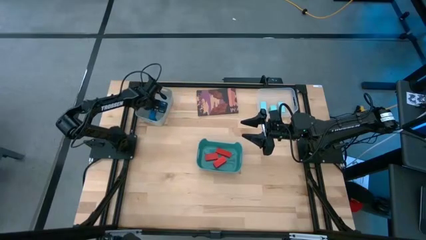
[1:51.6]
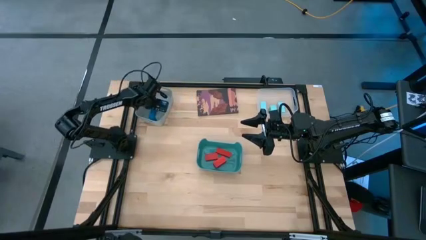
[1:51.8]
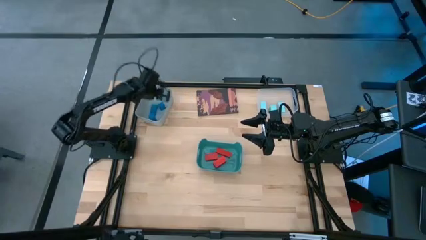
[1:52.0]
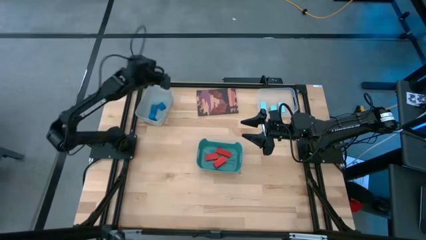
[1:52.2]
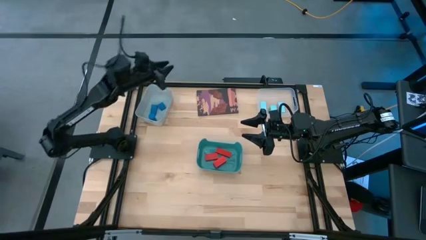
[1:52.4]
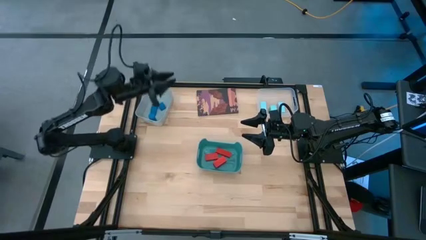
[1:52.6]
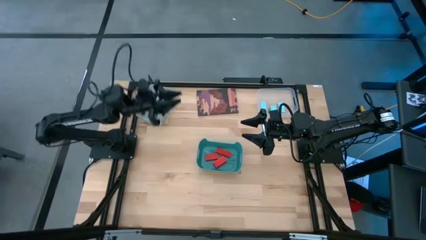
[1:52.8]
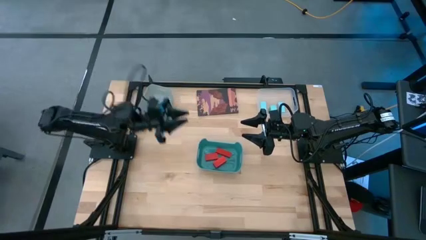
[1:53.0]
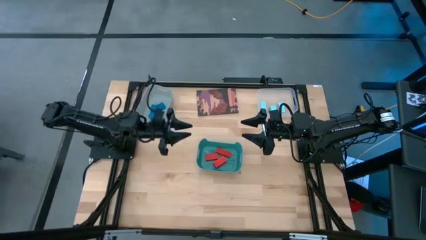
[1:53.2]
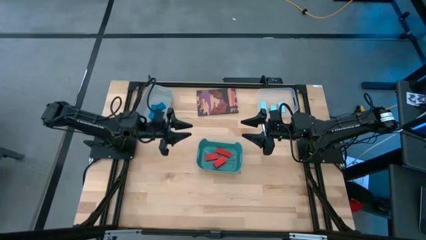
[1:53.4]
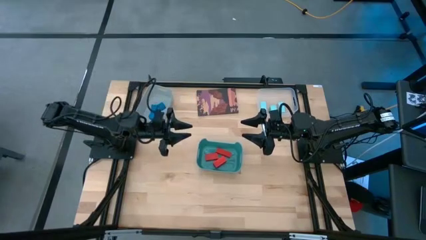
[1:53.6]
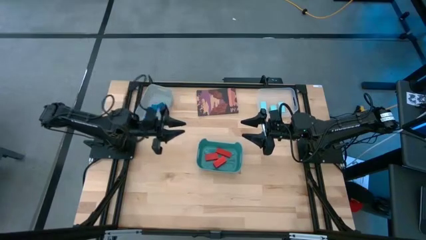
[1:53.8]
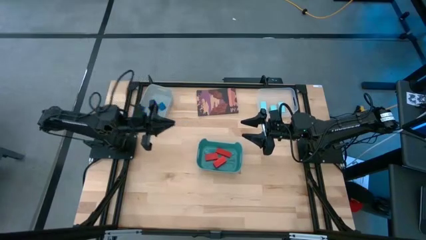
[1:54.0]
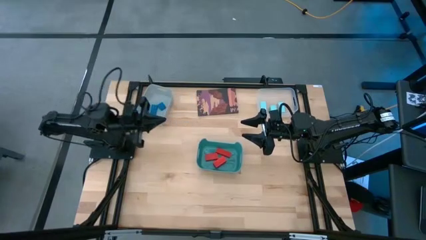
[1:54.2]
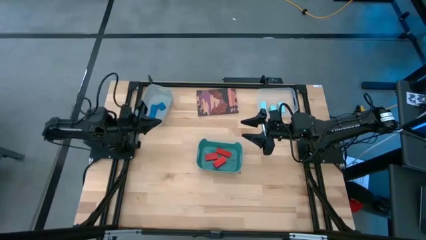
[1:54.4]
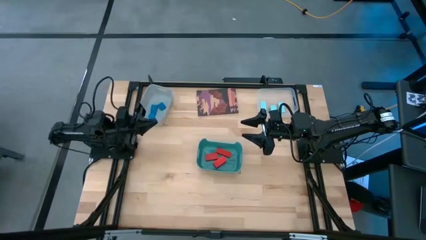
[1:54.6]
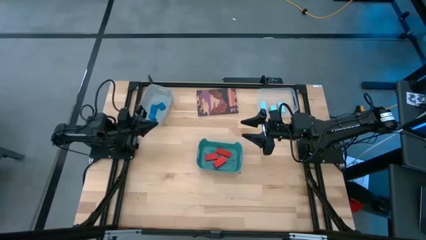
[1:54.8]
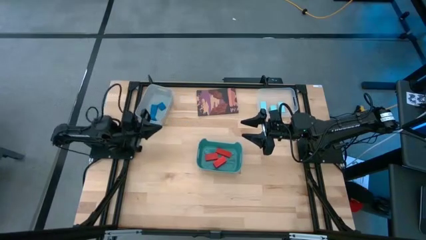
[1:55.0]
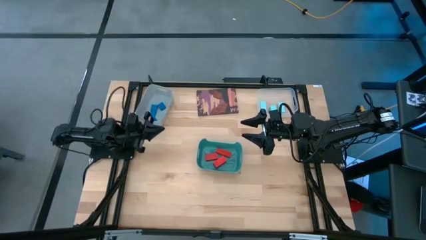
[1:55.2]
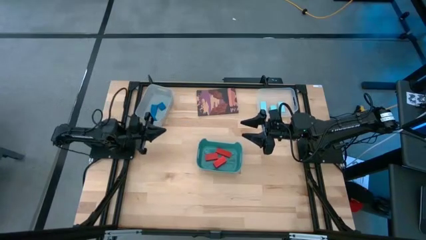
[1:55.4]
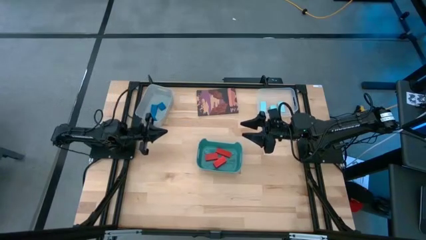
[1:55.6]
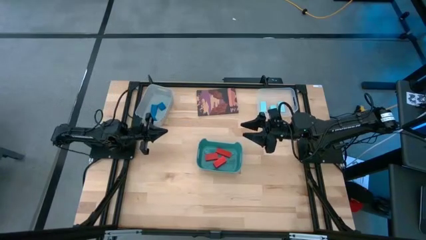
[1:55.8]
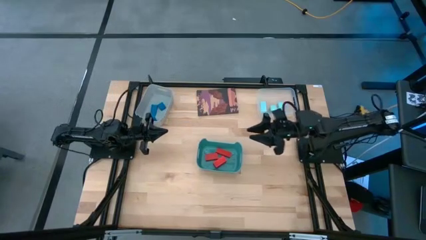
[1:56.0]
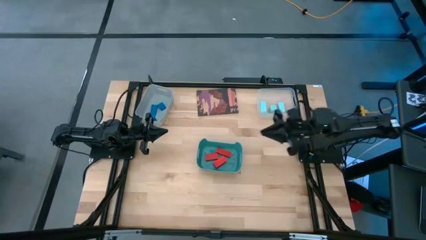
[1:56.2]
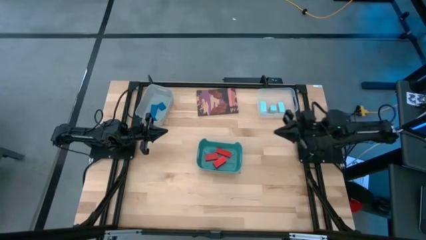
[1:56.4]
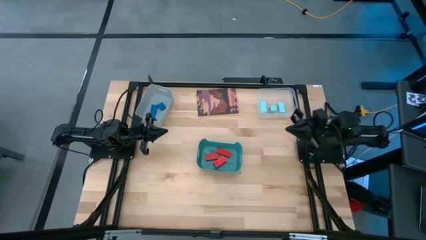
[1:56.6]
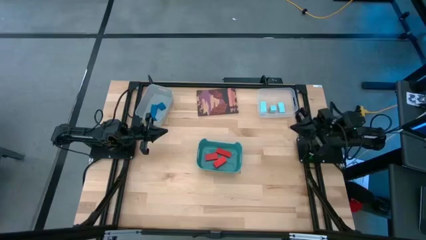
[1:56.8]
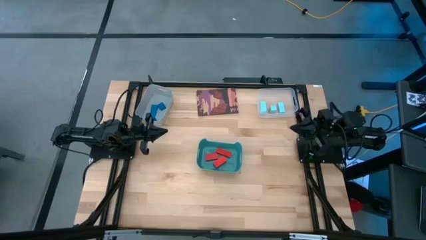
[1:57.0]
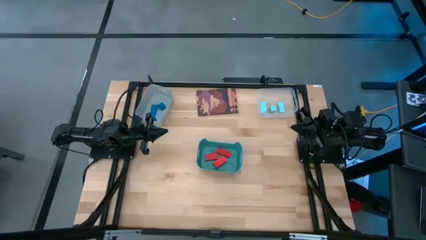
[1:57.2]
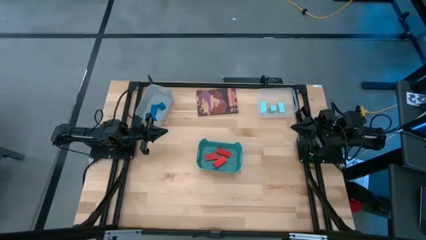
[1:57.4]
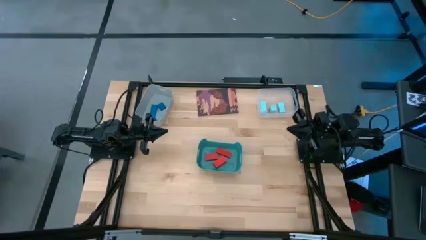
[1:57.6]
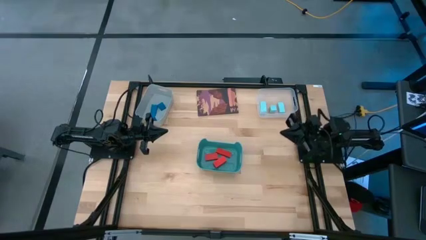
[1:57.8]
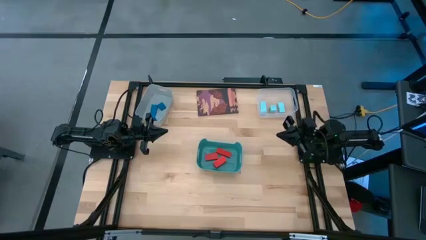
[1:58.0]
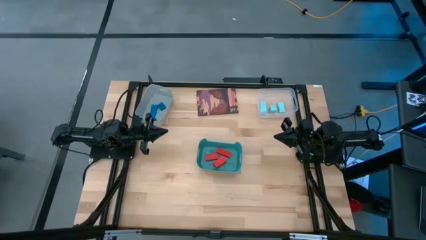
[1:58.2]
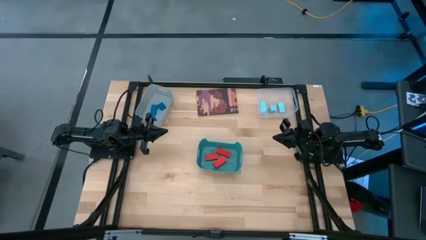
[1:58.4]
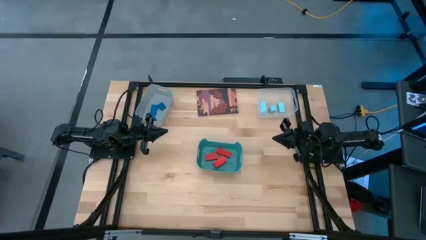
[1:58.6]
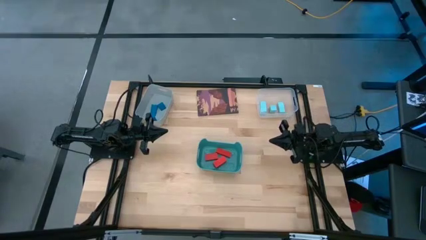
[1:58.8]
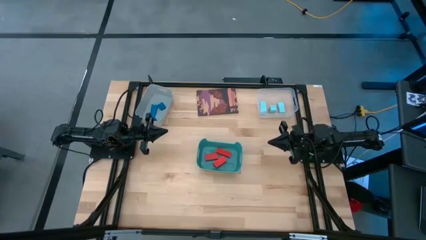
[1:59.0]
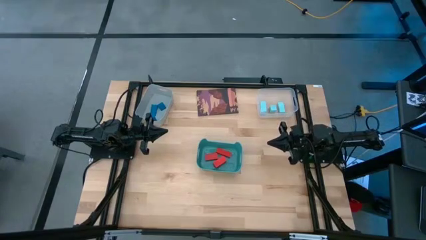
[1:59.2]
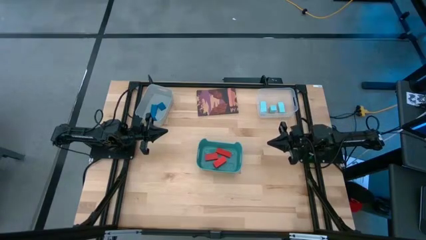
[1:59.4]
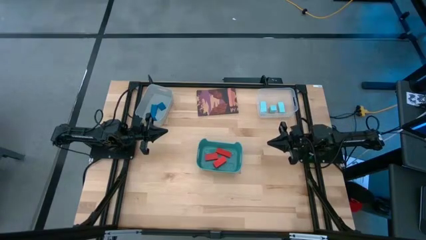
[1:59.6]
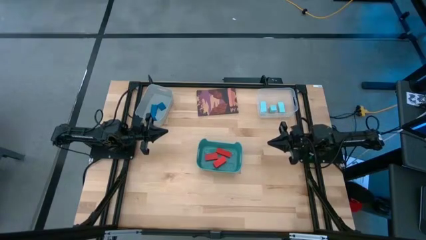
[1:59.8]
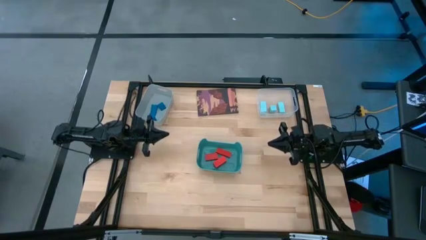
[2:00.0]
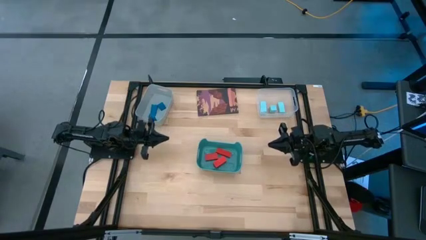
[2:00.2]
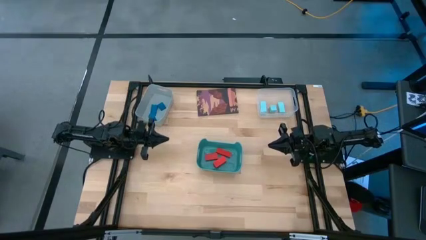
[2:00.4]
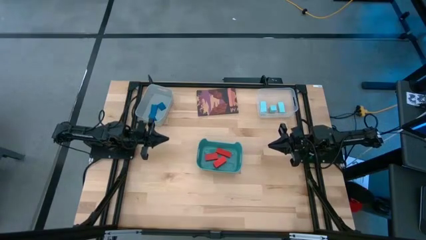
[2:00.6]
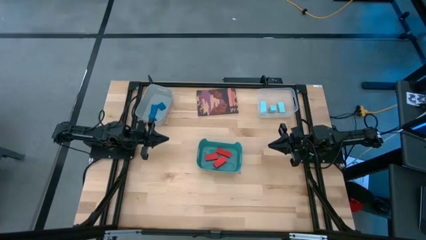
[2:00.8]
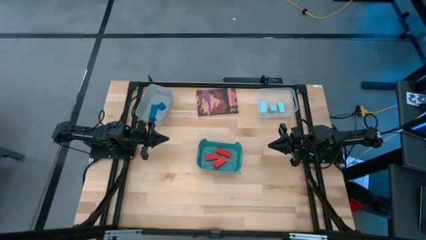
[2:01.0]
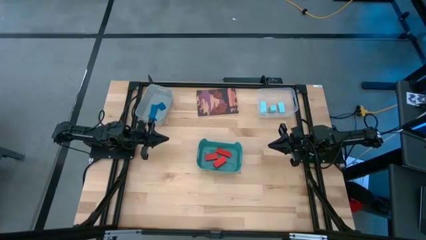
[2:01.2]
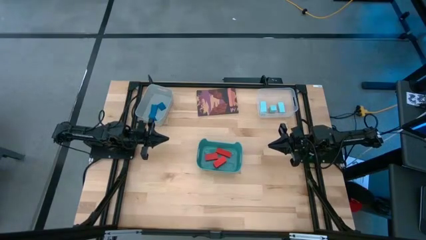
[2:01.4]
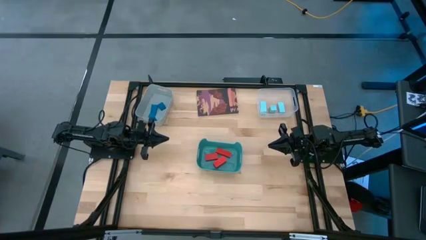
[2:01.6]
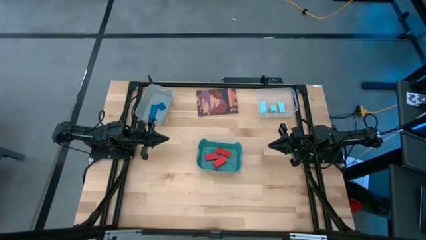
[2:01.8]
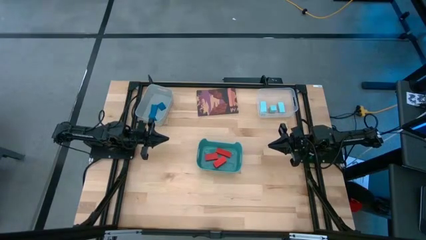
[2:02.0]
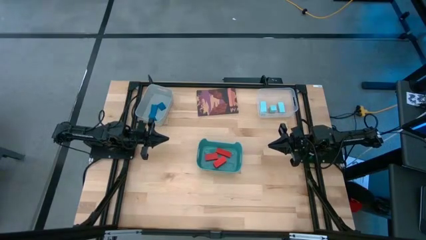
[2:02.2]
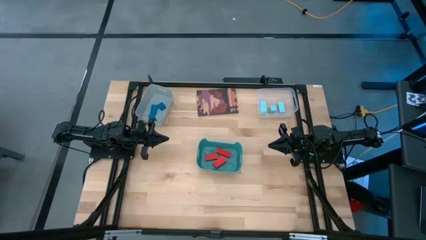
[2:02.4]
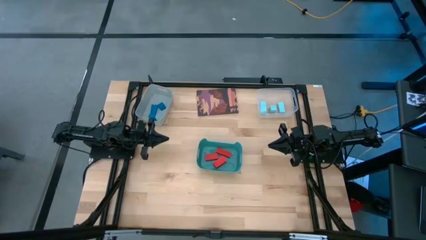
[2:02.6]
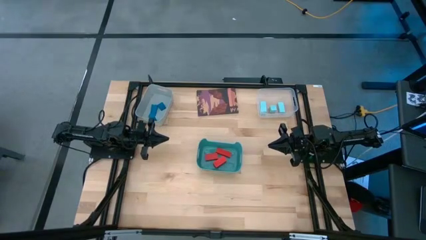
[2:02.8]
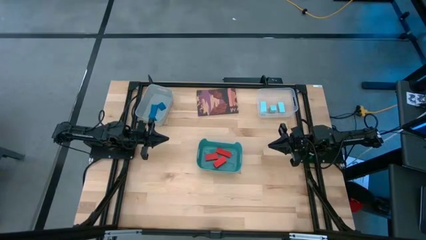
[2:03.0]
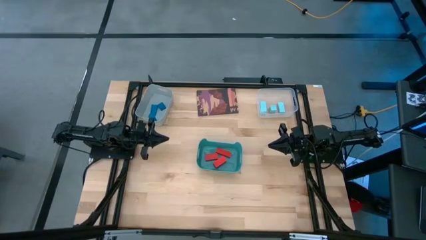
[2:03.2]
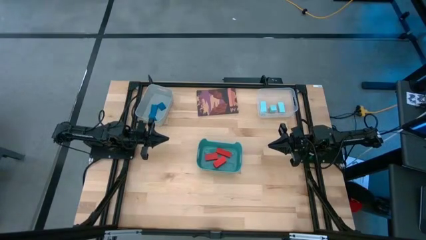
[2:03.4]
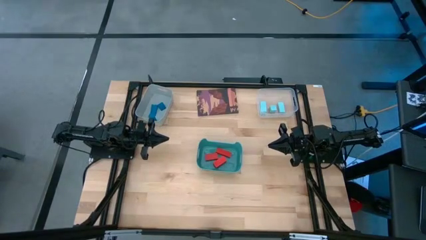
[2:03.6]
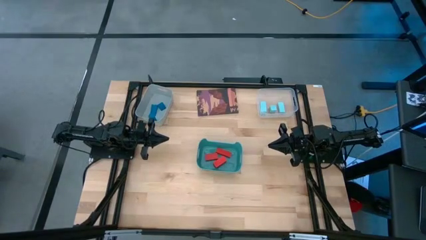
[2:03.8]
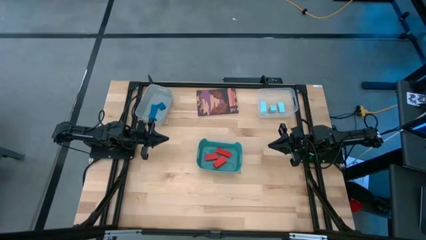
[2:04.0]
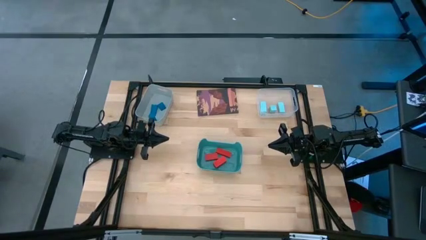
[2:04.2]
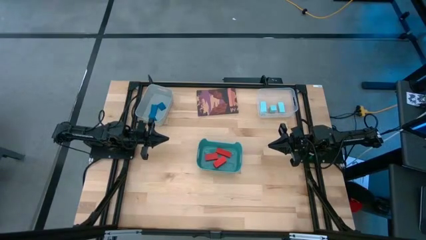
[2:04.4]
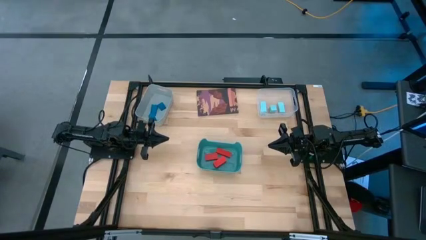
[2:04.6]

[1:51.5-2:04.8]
Task: Sort & place blocks by color
Return to Home Position

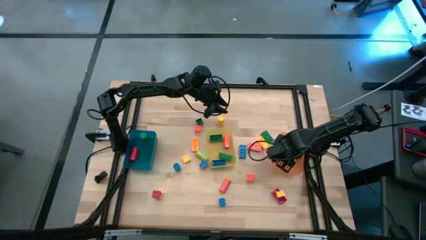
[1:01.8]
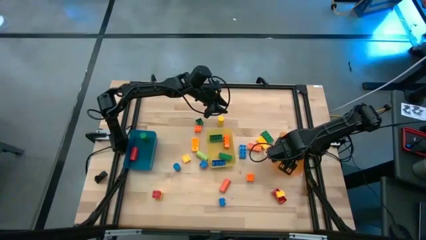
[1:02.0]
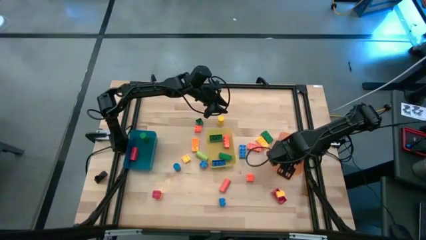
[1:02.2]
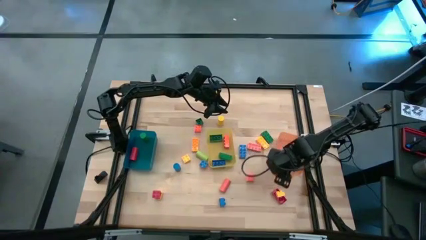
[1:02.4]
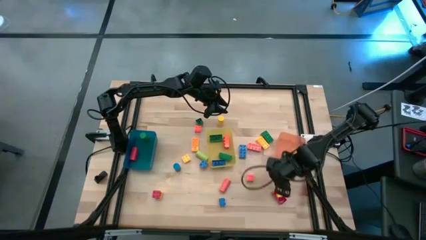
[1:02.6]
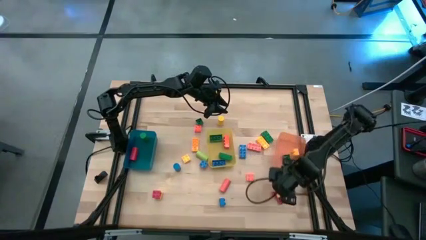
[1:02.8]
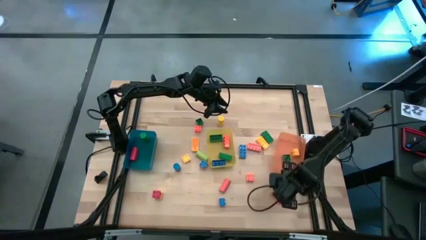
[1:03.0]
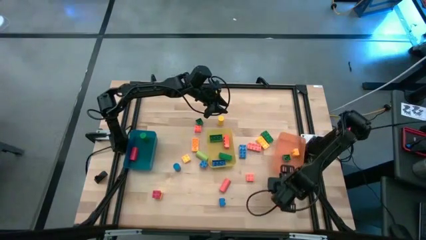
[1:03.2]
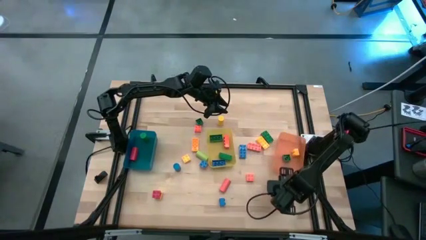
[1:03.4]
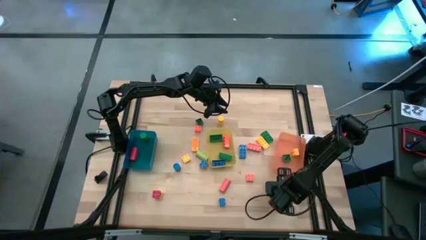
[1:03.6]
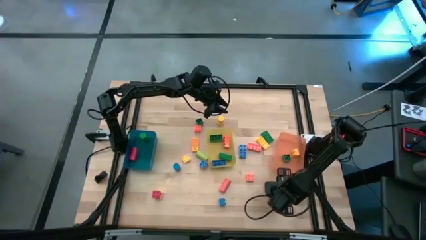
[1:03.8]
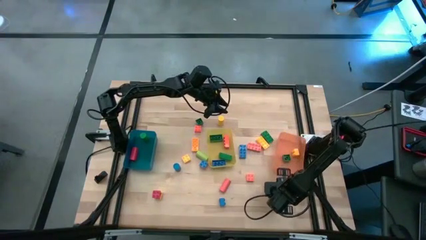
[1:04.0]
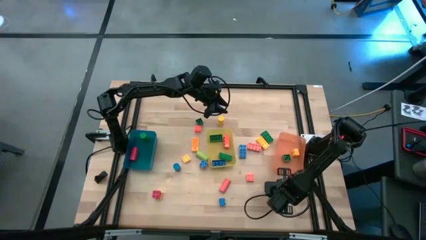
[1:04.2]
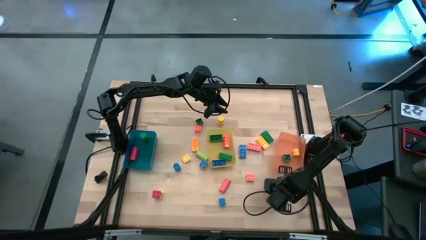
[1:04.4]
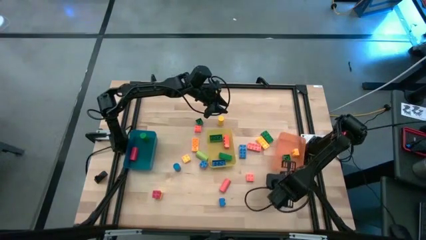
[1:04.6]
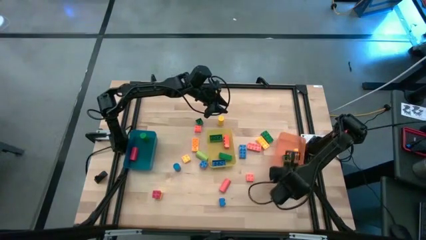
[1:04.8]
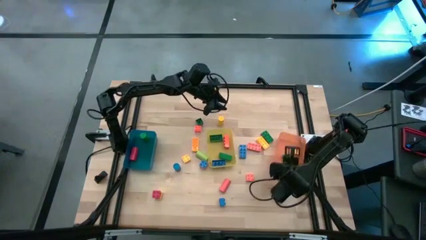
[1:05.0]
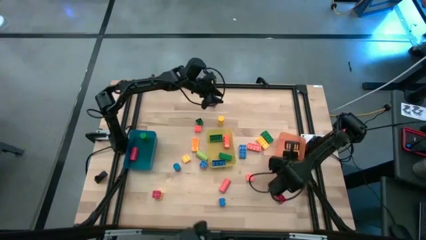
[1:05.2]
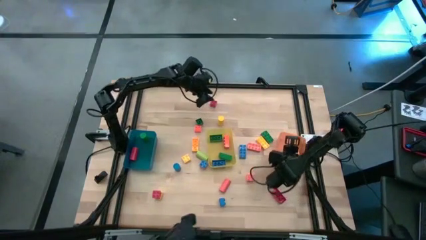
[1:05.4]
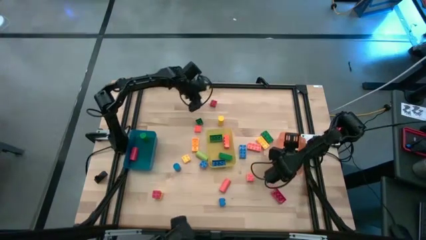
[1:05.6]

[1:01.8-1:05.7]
Task: Sort blocks by size
Put the yellow 4 stud game piece into the orange bin
